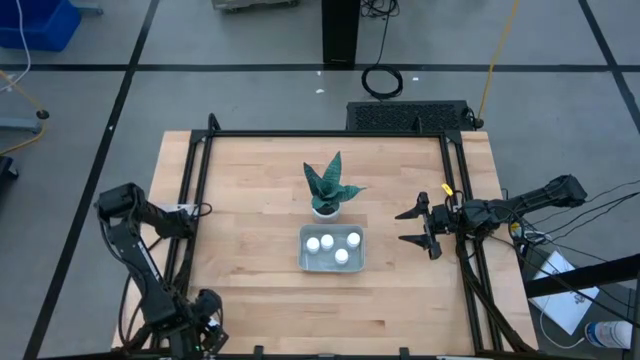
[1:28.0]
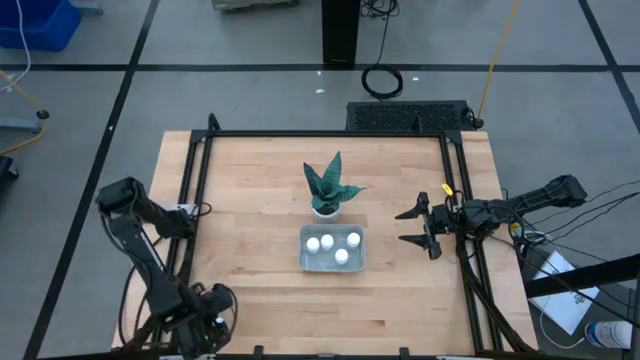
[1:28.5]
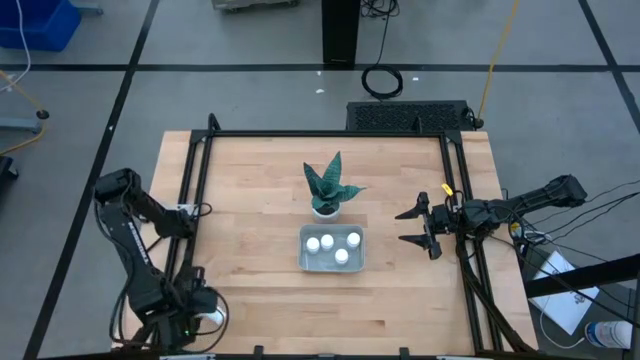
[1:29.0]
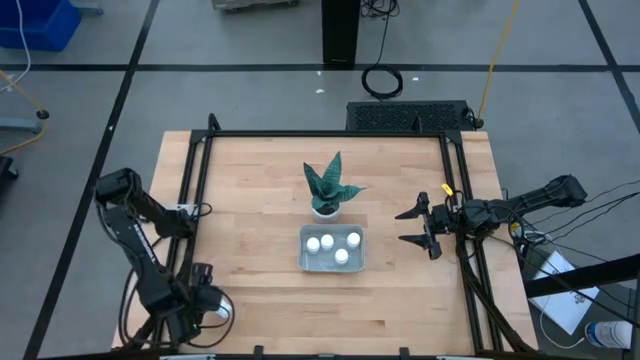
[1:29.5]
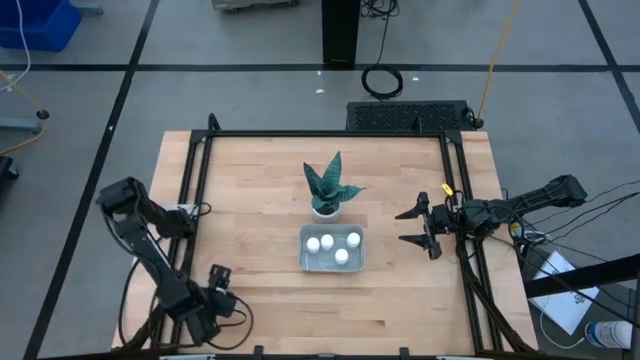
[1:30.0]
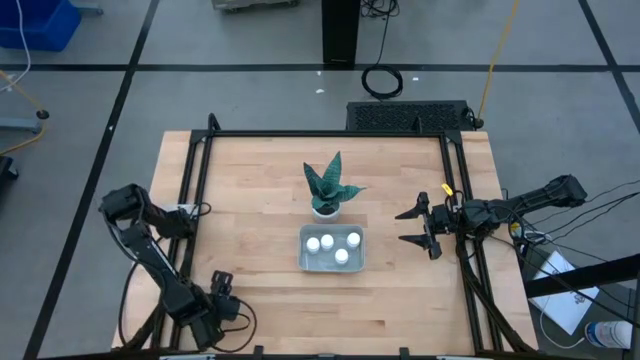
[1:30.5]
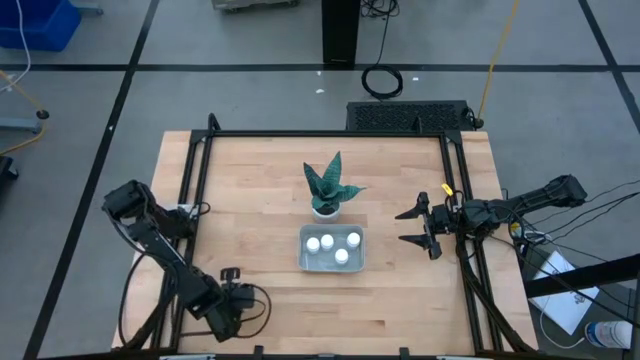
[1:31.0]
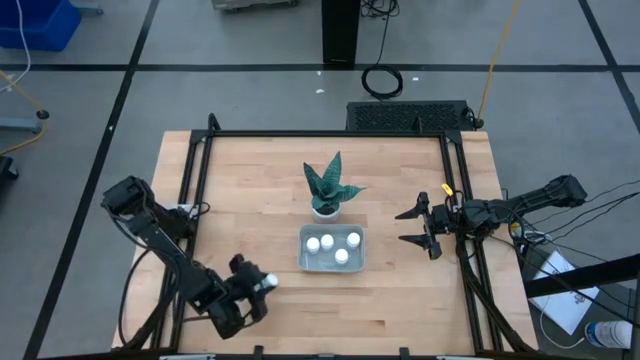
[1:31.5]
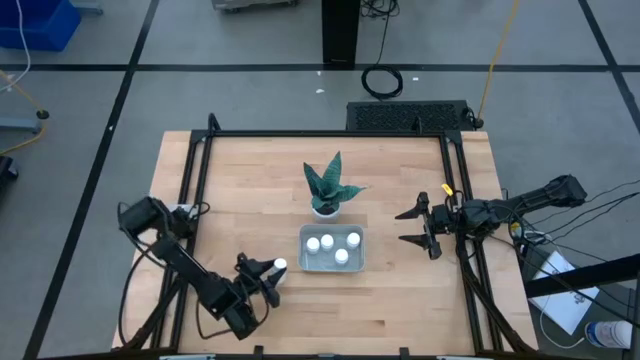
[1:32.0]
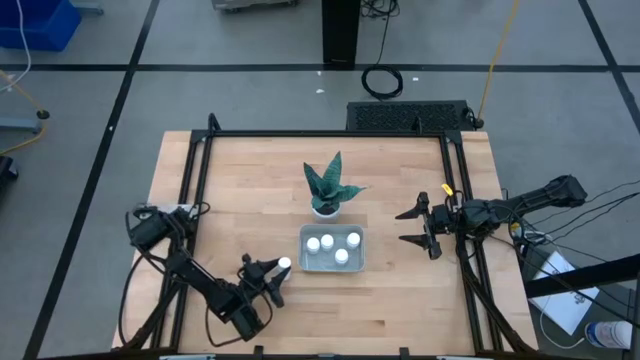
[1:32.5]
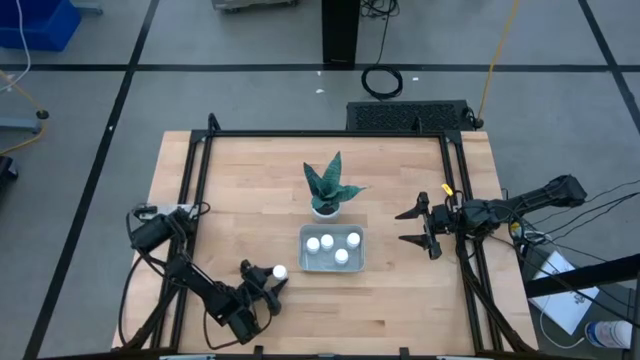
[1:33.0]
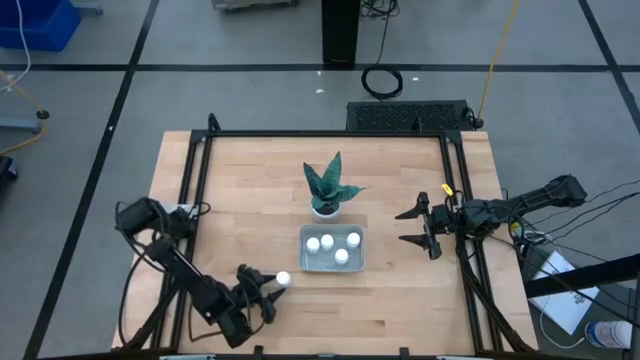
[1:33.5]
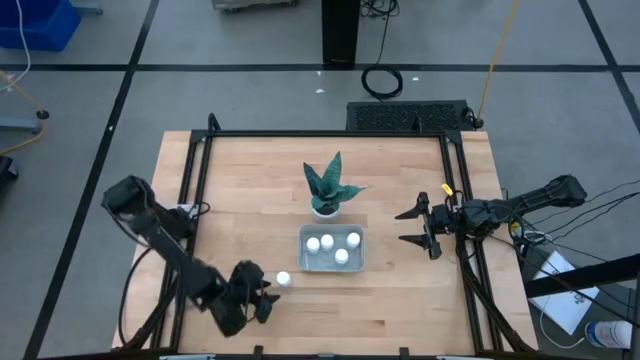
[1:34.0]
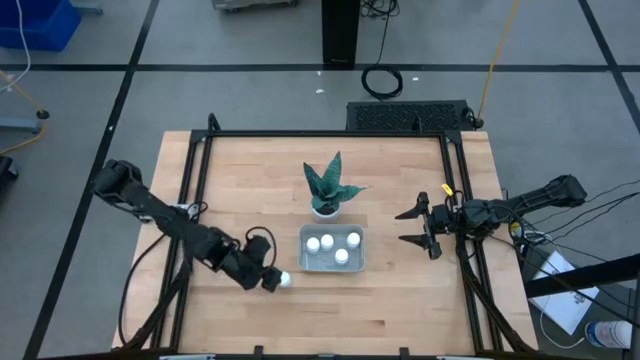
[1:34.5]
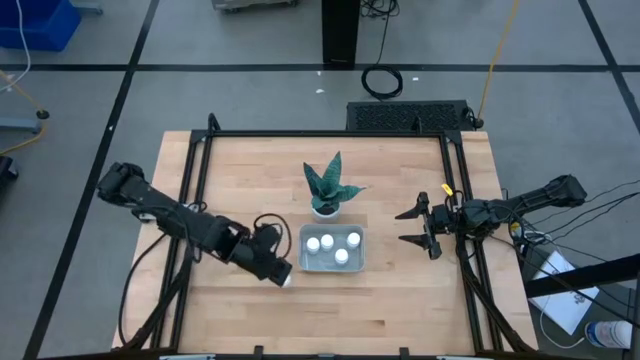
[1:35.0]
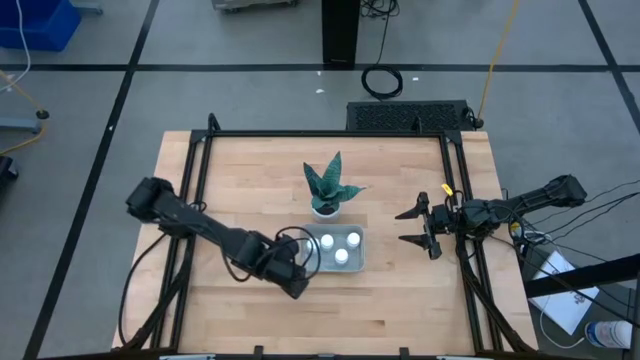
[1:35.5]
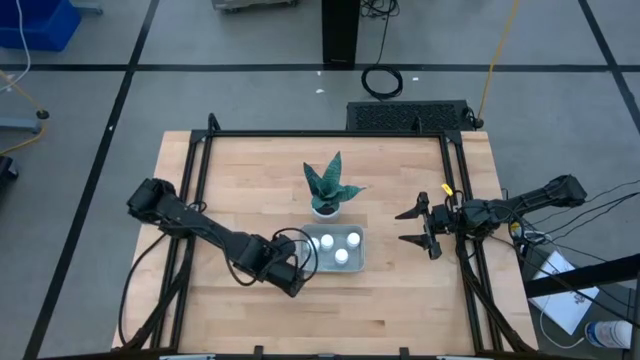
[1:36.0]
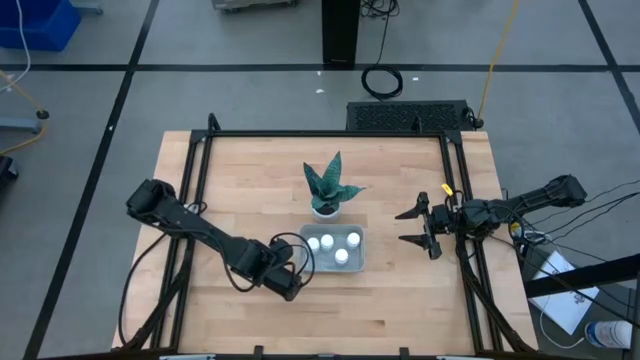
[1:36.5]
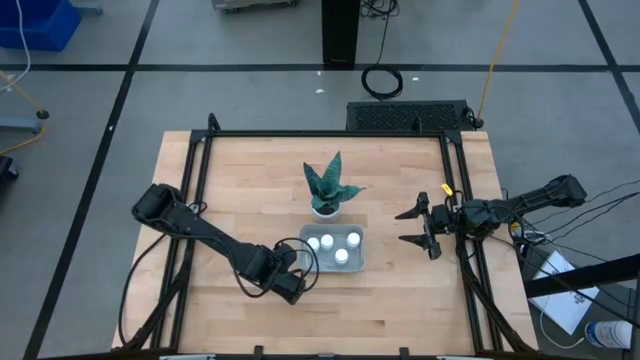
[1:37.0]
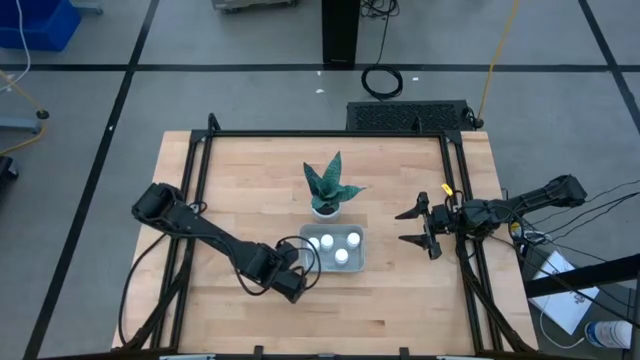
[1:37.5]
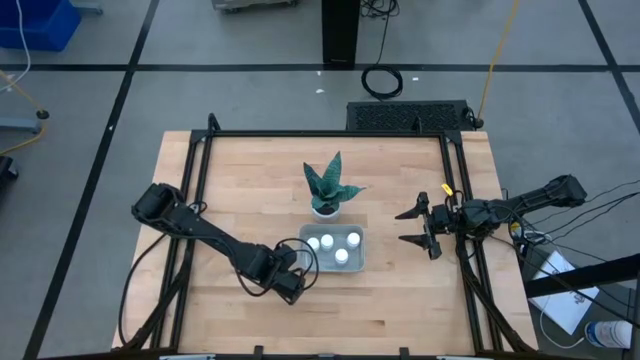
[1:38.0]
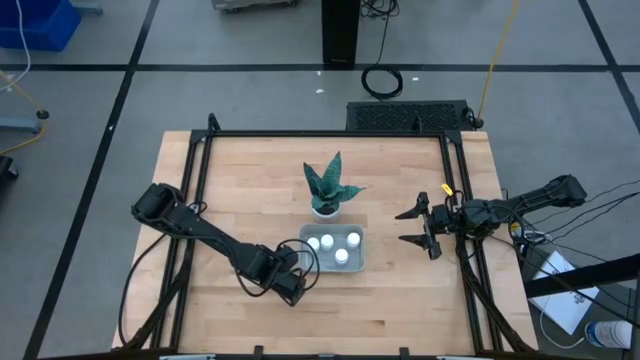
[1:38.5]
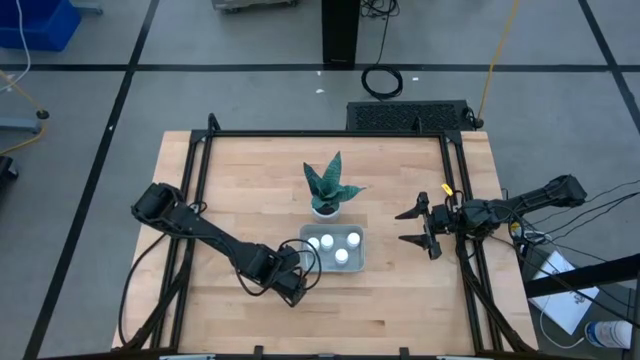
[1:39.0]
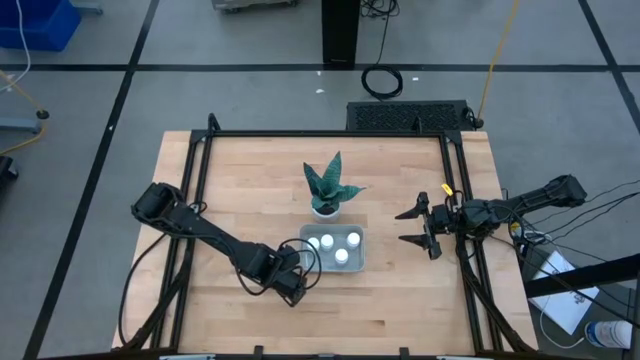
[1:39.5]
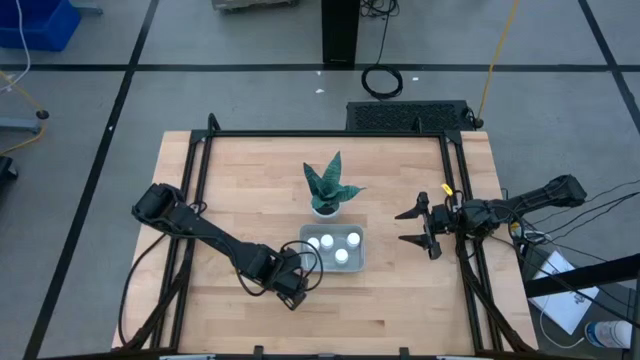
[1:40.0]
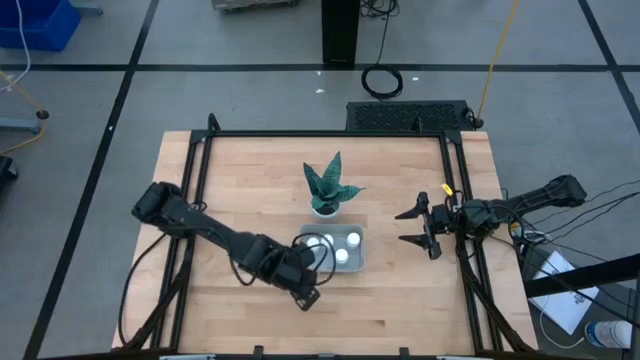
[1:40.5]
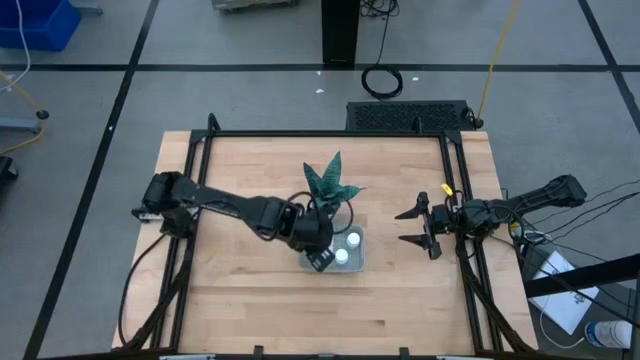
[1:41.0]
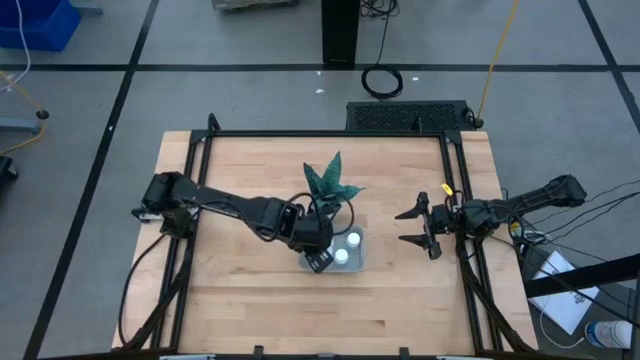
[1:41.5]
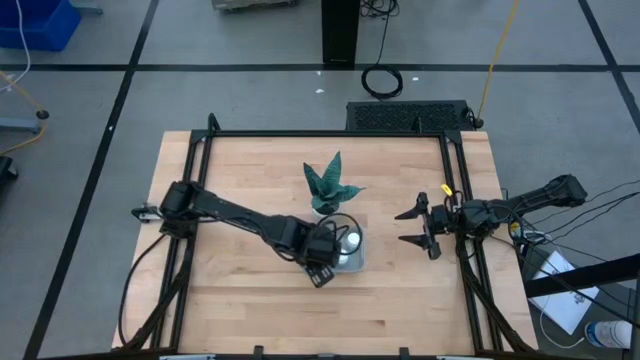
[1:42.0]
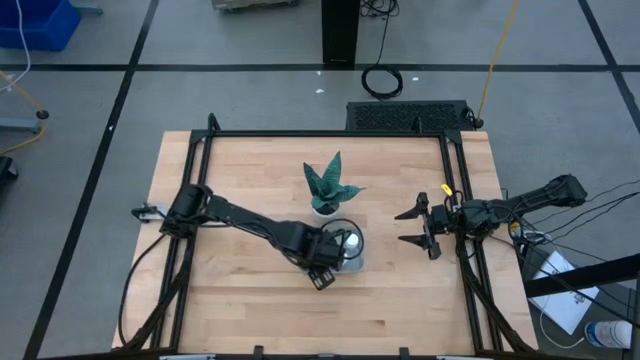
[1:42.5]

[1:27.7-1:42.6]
Task: Pick and place pill bottles into a basket
Put the white pill bottle into the gray bin

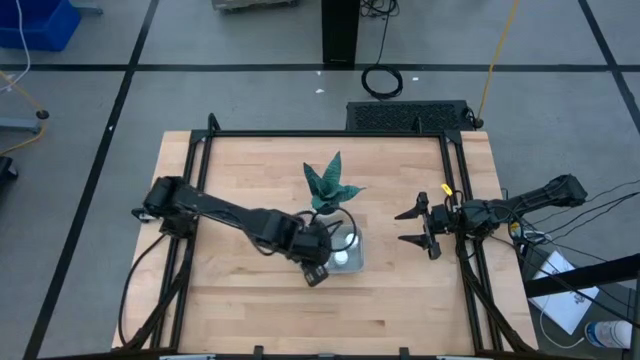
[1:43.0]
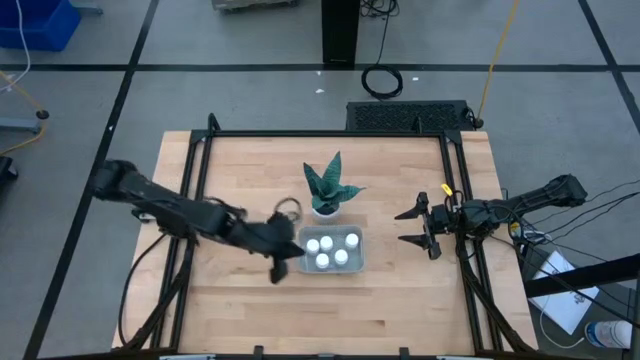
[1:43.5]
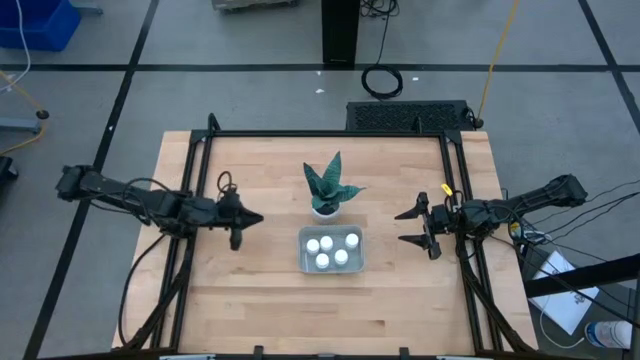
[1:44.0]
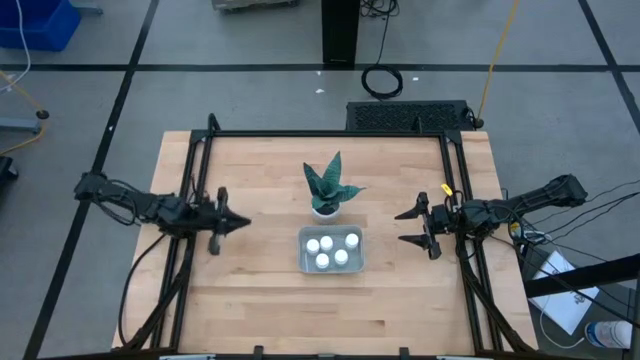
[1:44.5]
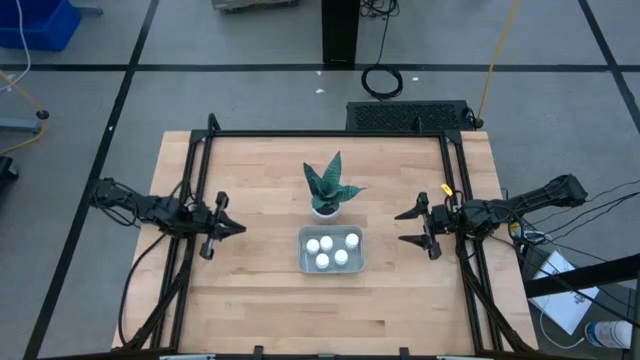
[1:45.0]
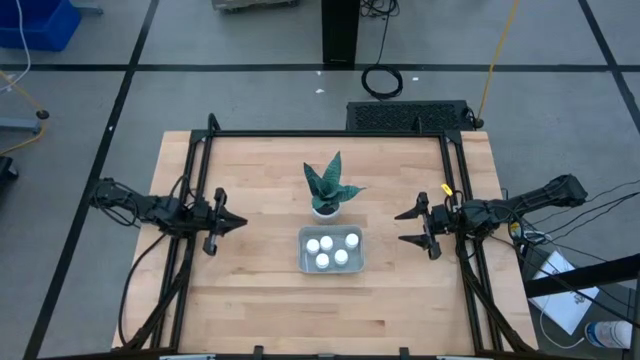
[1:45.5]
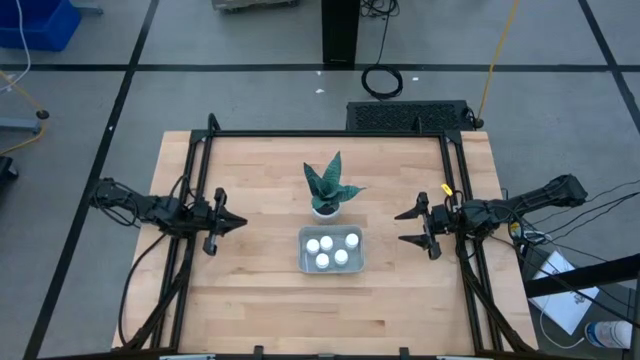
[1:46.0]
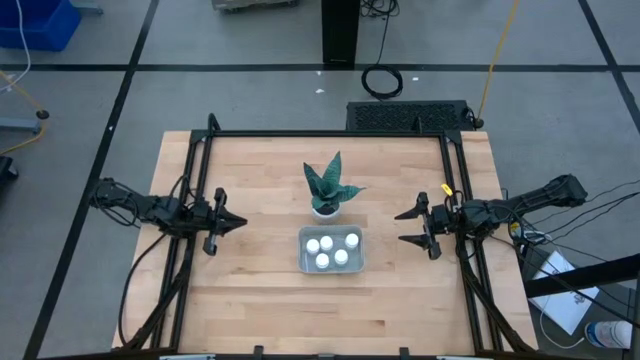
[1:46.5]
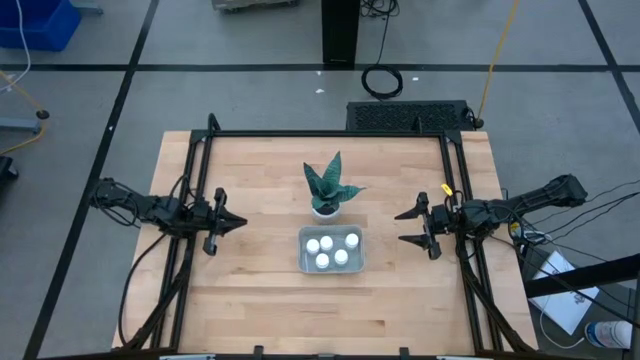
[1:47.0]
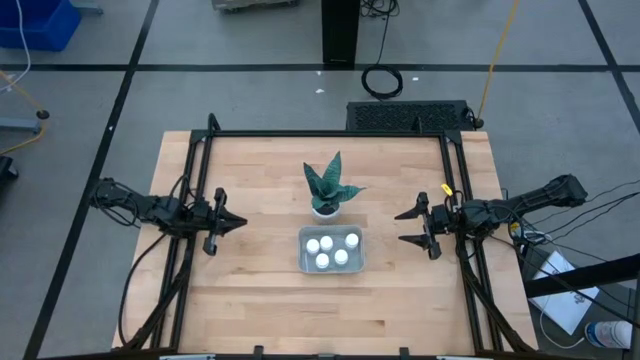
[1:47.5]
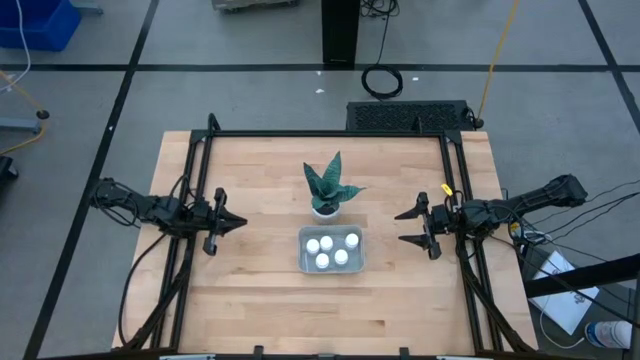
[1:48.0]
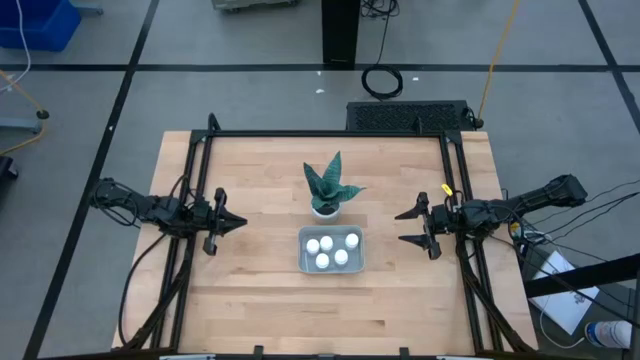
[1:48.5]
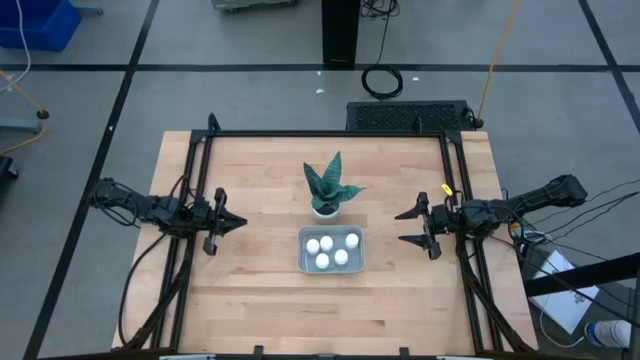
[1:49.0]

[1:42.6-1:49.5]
Return to Home Position

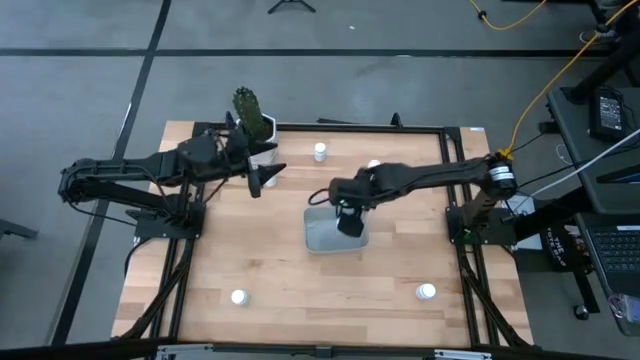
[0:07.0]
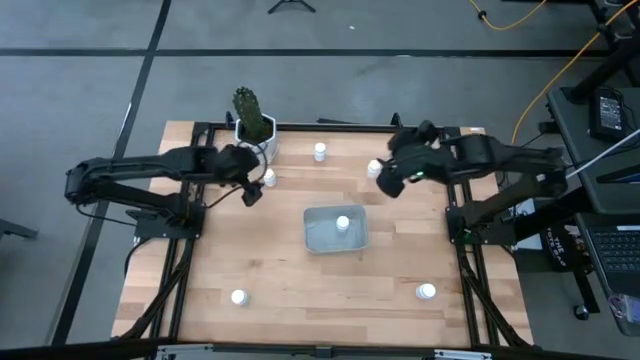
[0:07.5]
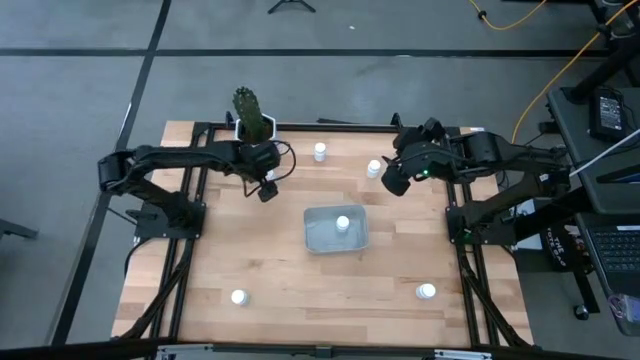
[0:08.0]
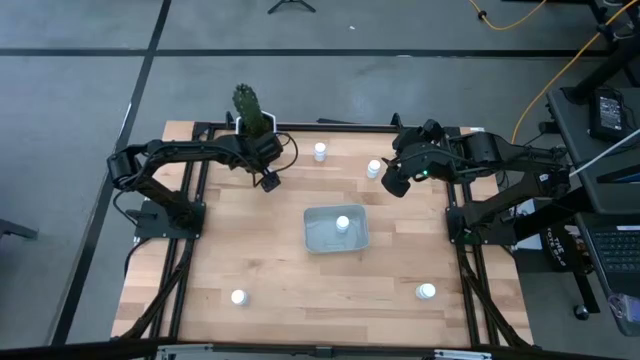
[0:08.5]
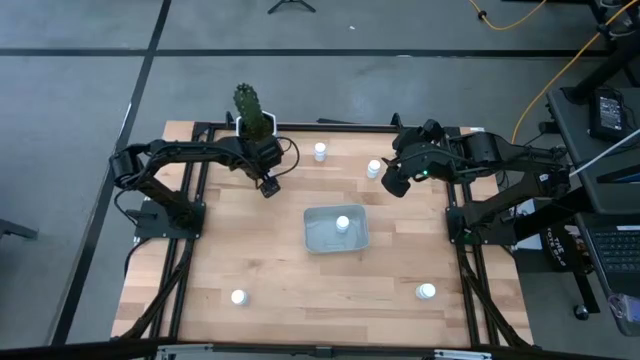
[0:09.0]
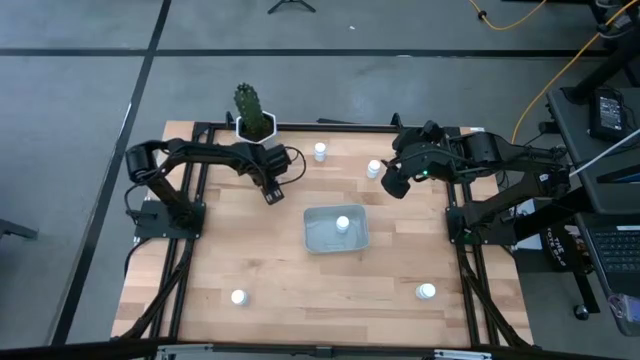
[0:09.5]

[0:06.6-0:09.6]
Task: Pick and place pill bottles into a basket
Put the white pill bottle into the gray bin
